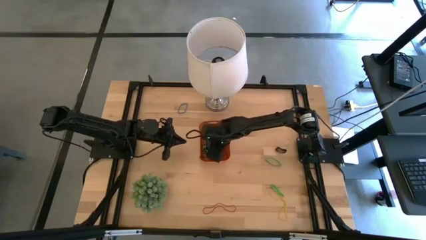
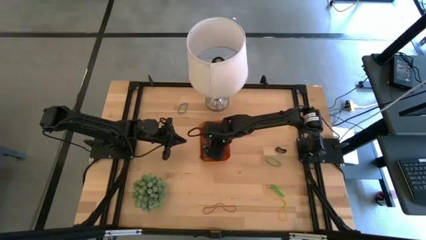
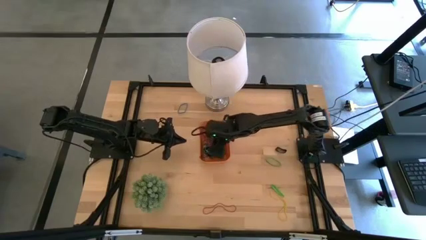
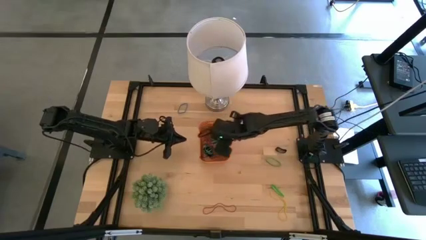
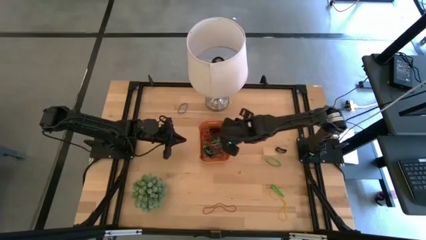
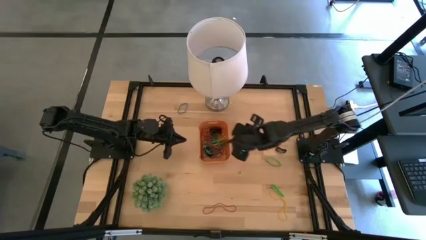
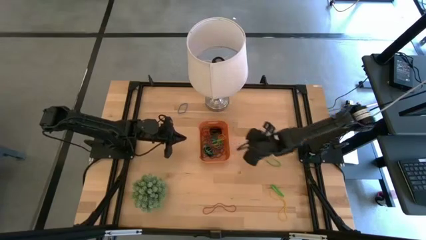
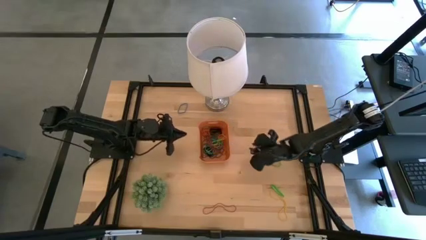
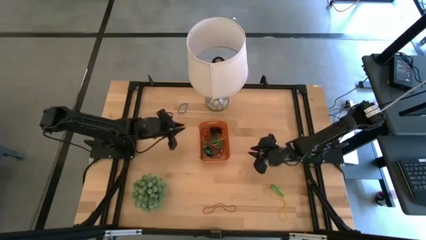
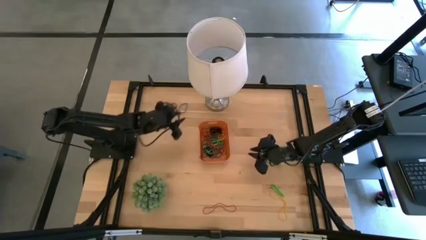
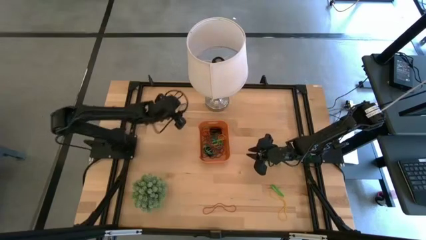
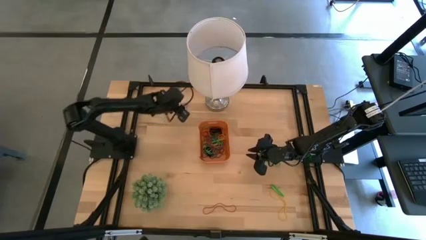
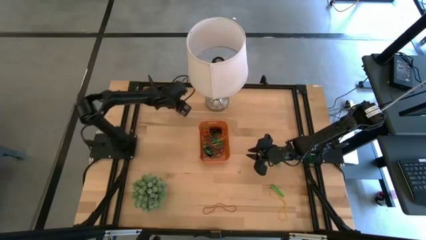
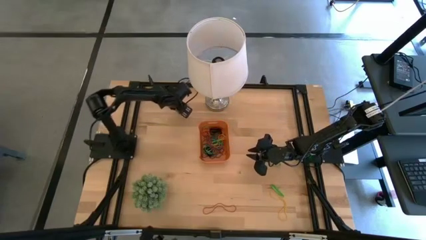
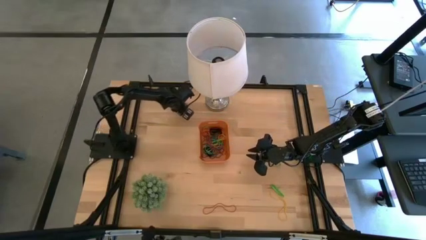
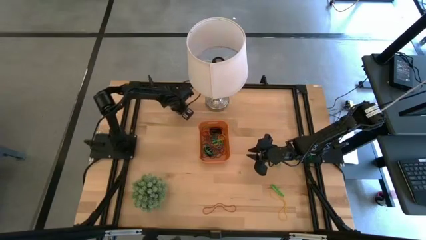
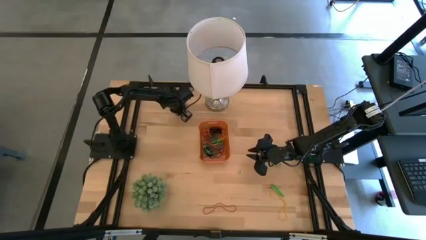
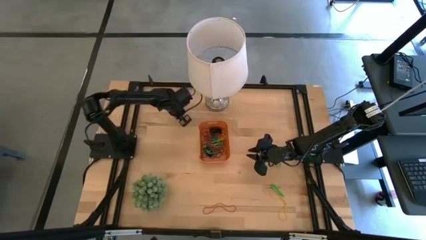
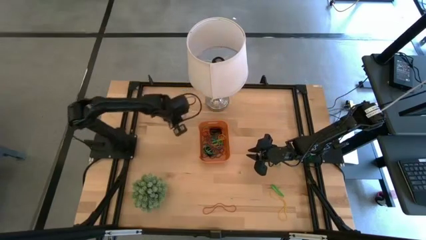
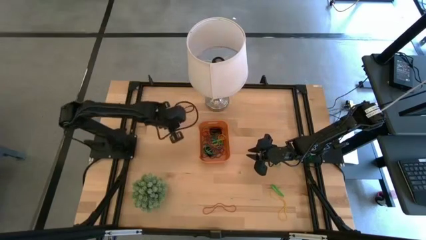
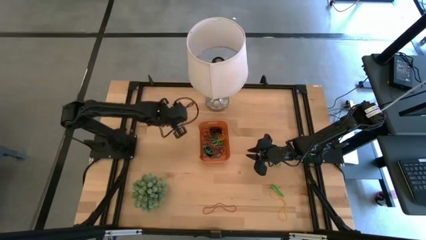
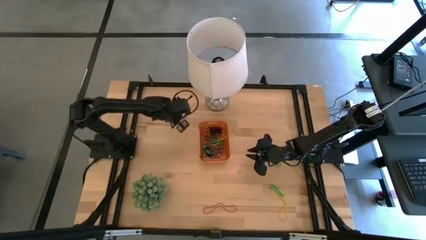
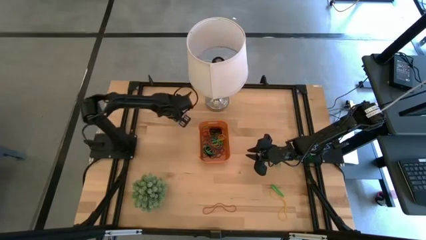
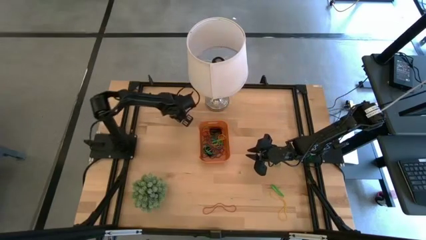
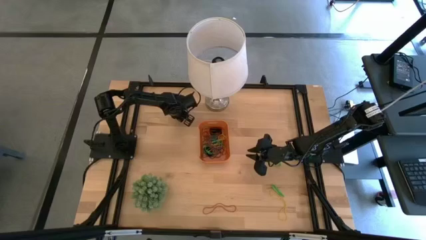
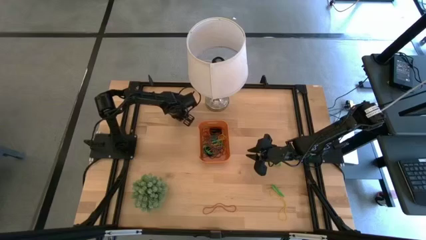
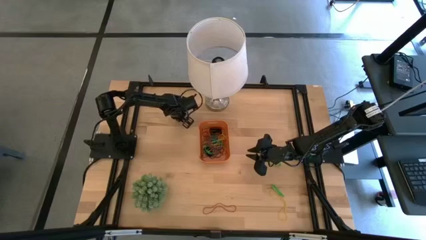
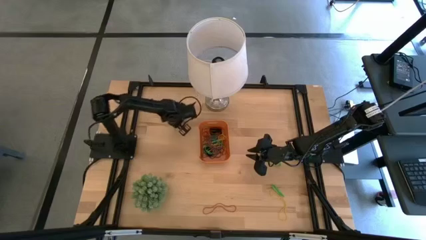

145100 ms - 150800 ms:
Task: Pick and place rubber bands into bin
Put the blue rubber band into the orange bin

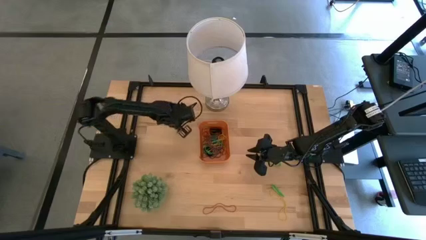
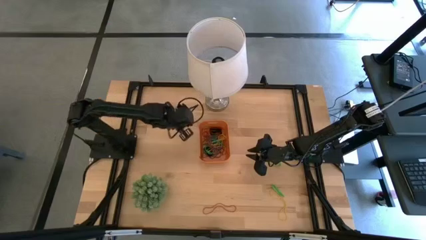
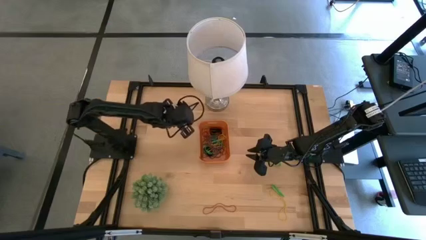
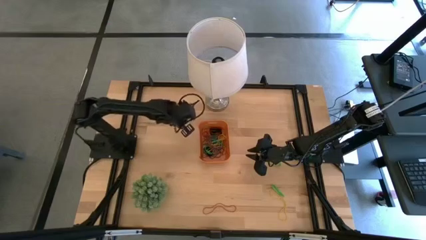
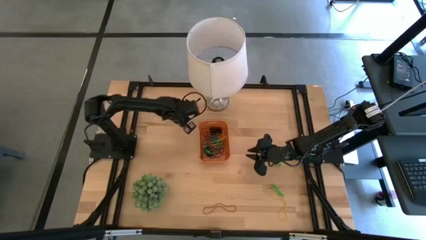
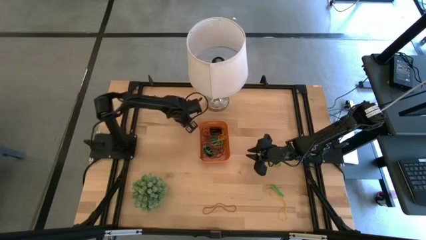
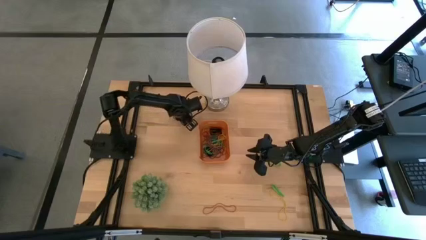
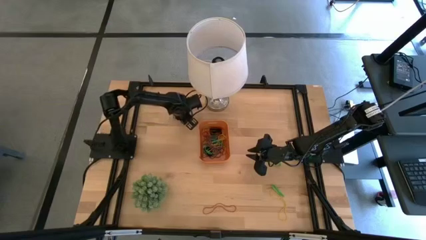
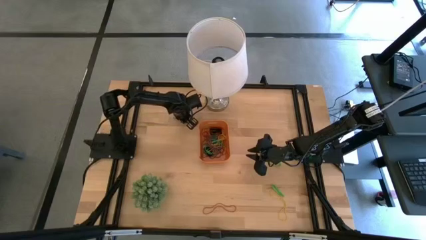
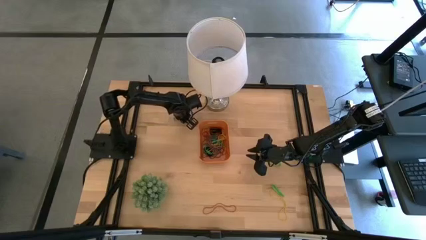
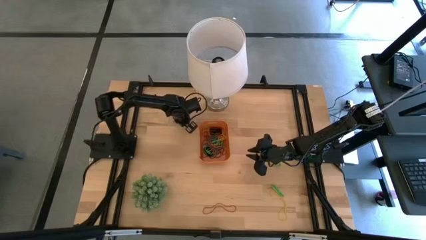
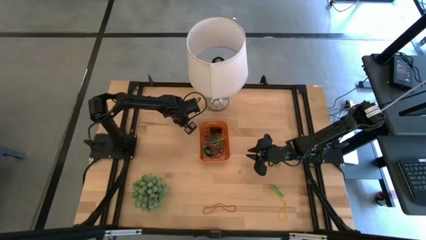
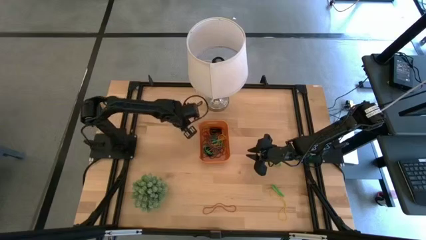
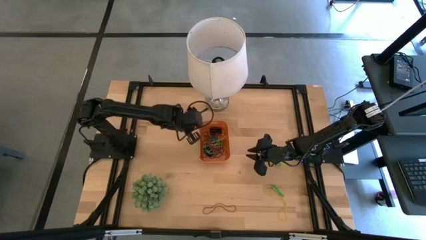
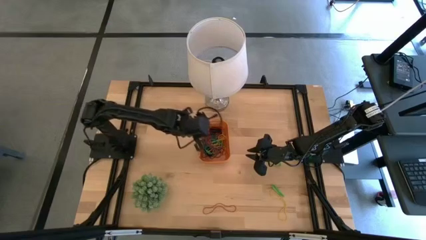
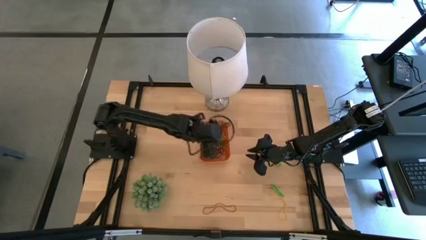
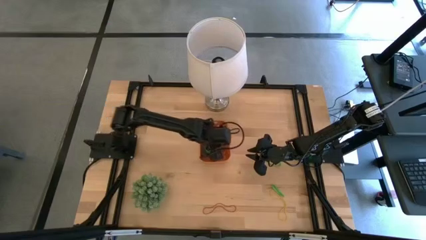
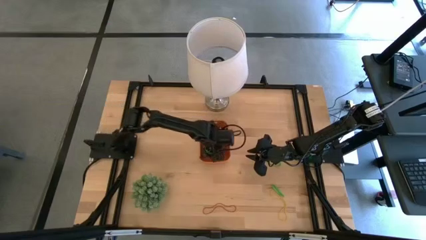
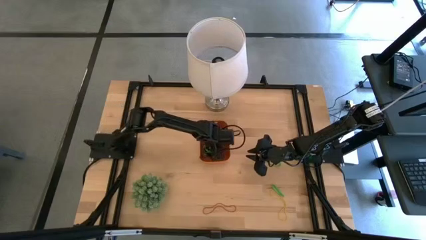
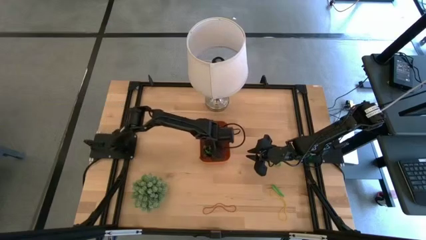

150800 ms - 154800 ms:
Put the blue rubber band into the orange bin

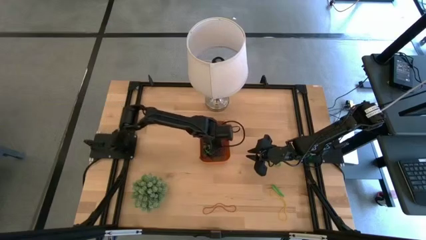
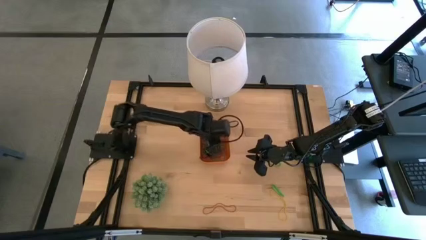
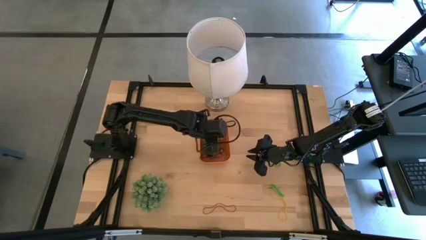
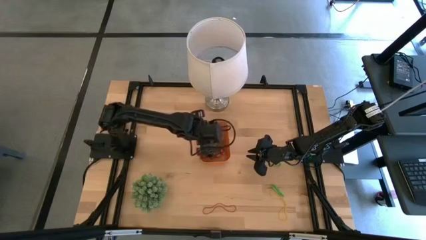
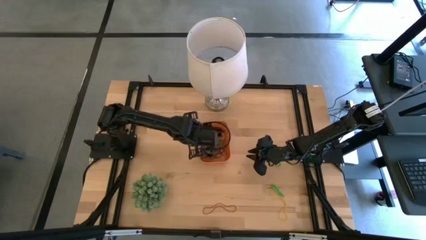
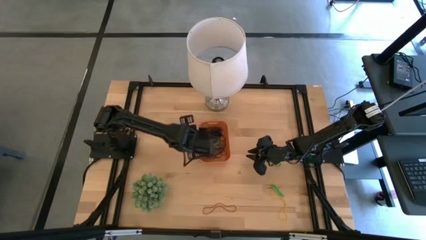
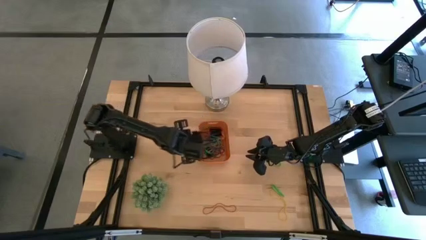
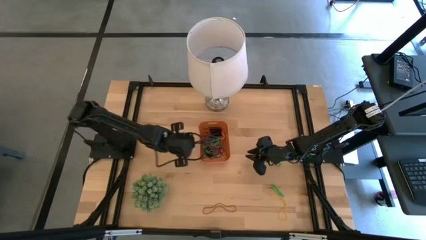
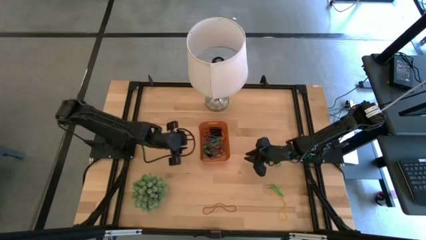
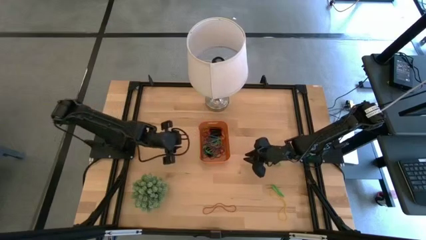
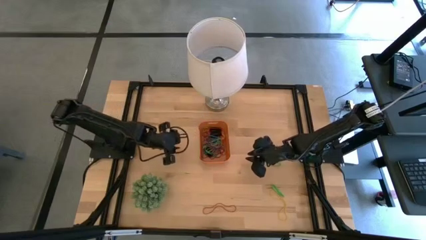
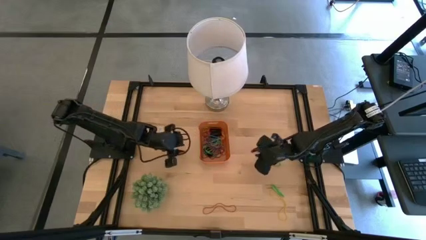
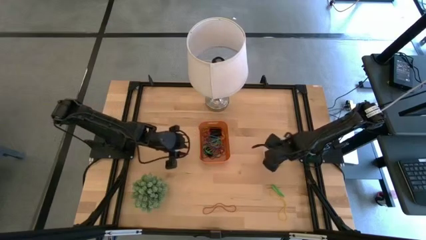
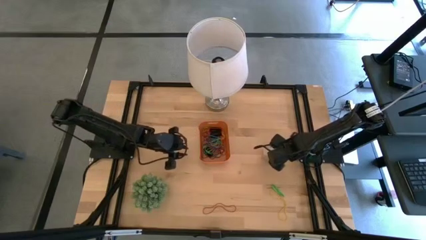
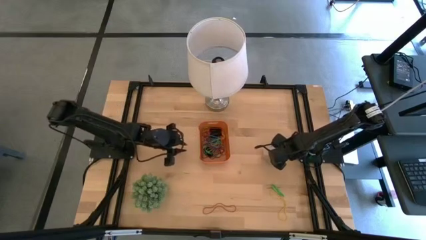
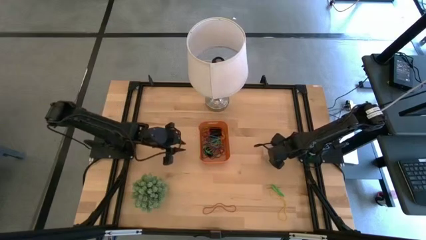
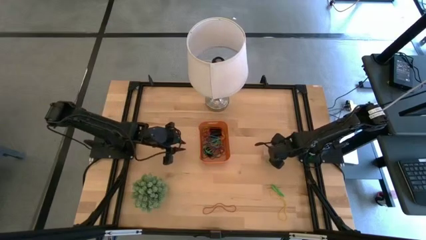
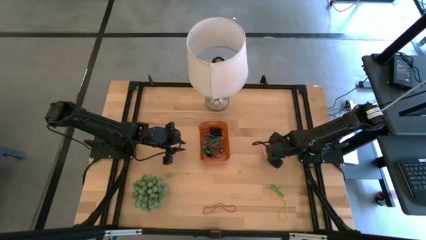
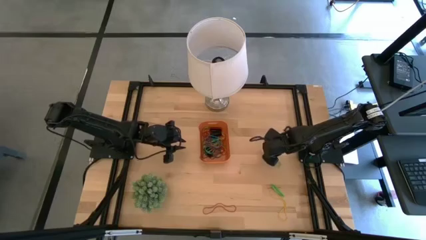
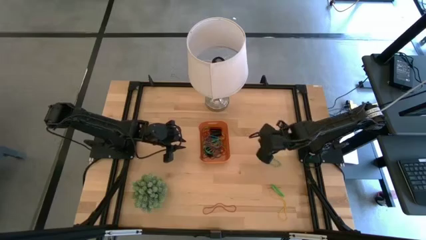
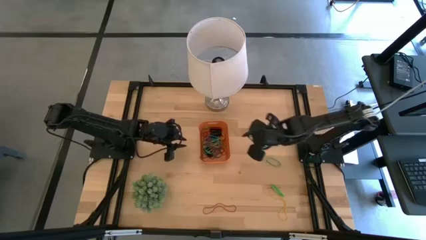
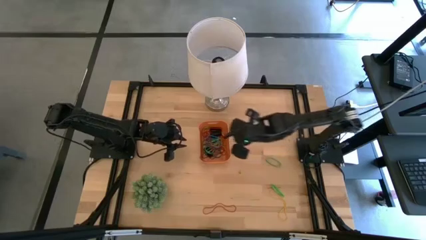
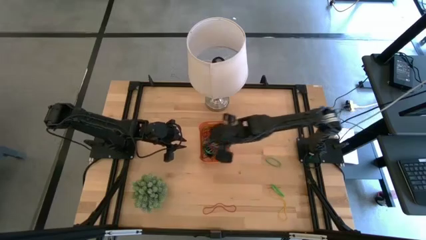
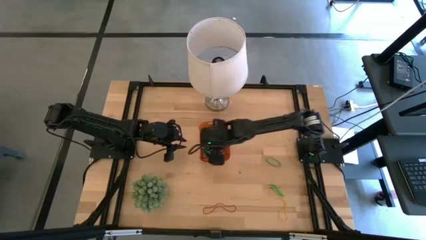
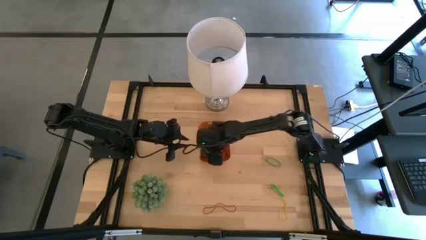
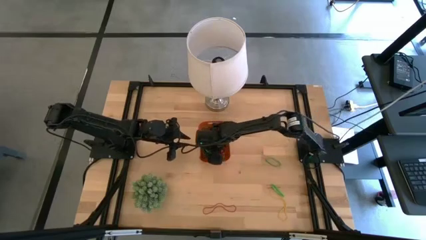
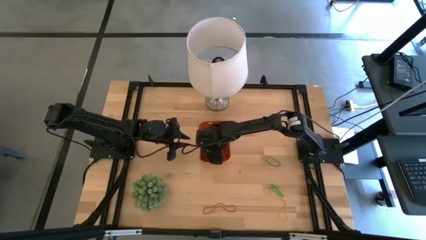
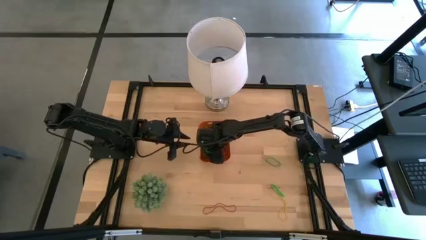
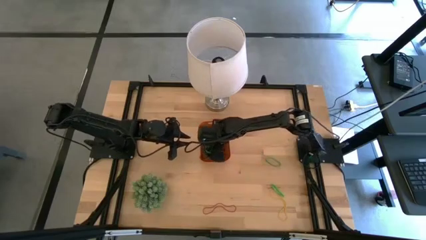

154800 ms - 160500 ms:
Put the black rubber band into the orange bin

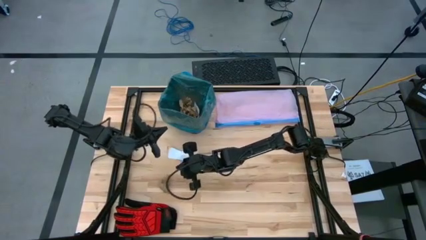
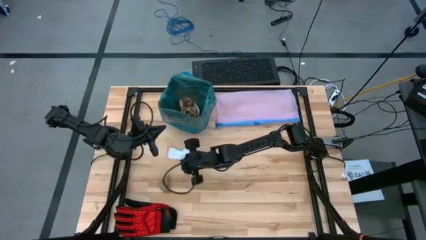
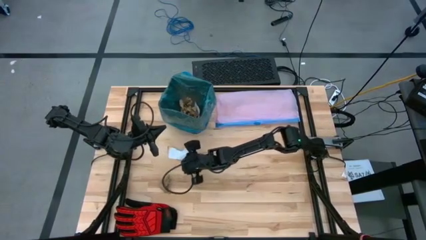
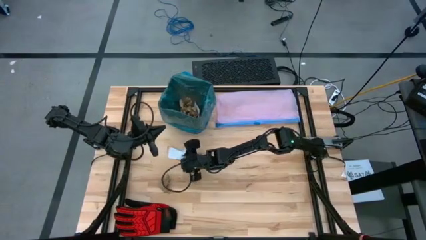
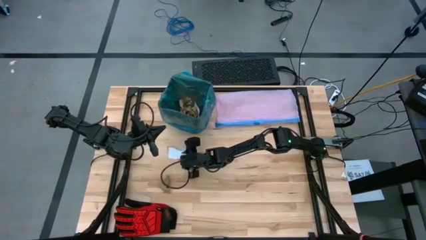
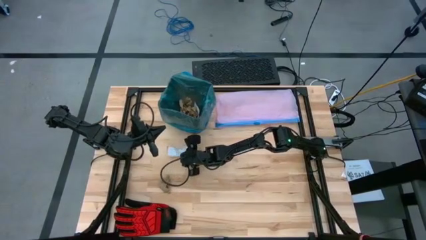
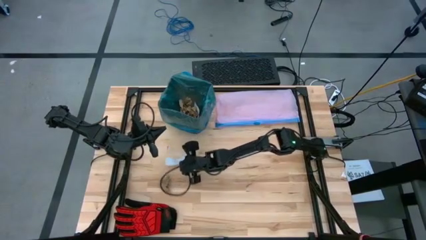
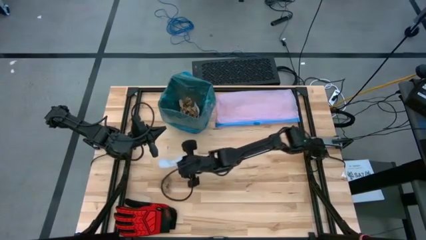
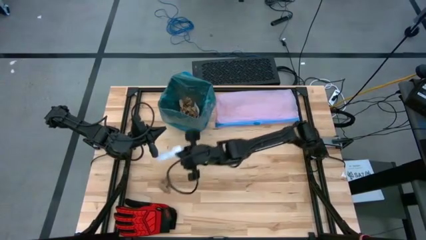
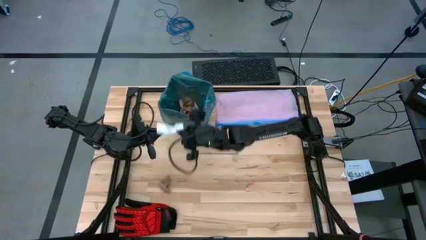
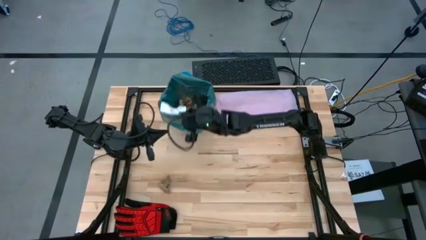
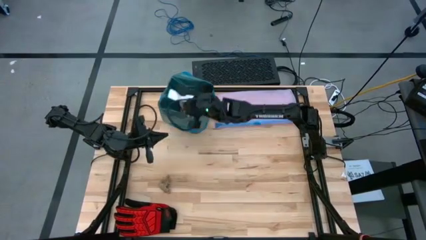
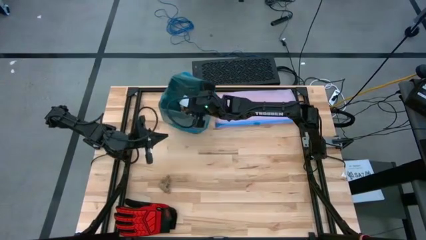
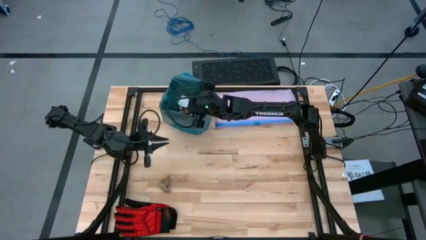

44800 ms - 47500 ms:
Task: place trash/remove bag and relplace
Put the white paper into the trash bin
